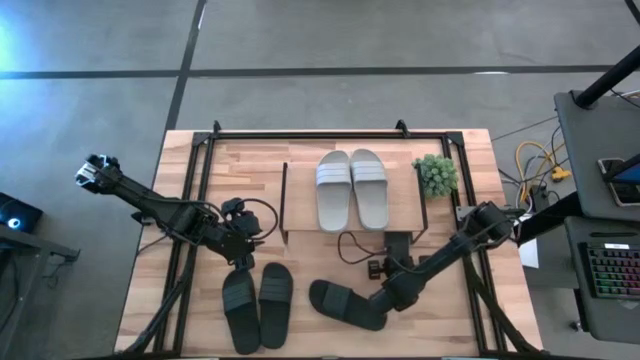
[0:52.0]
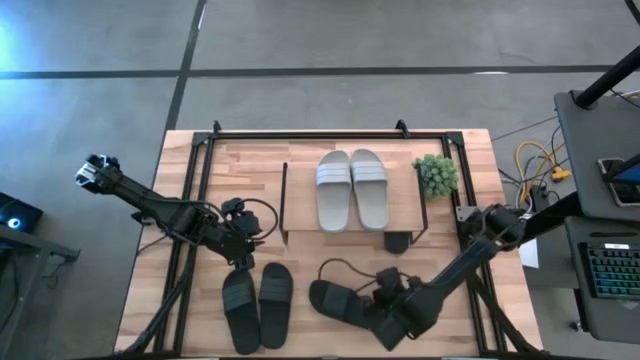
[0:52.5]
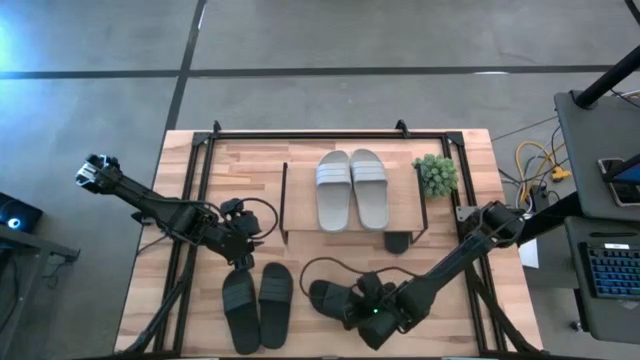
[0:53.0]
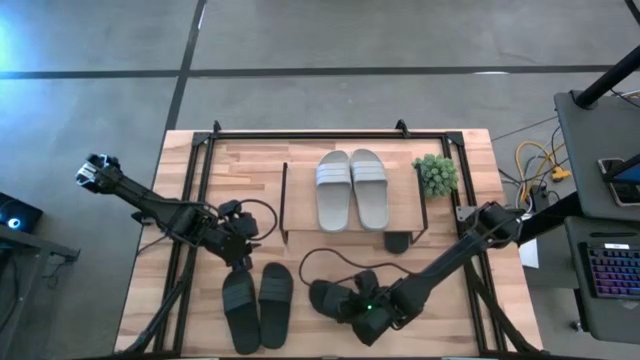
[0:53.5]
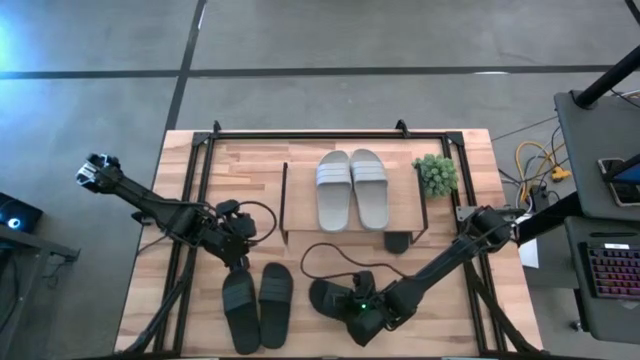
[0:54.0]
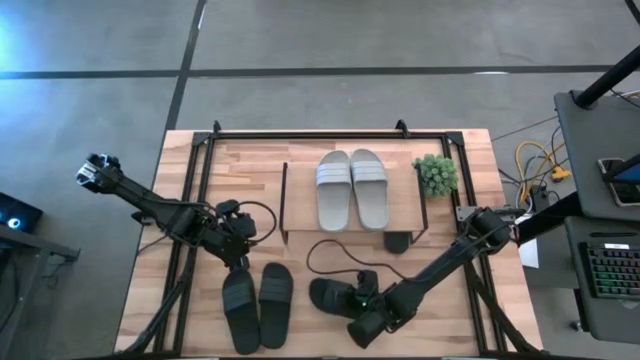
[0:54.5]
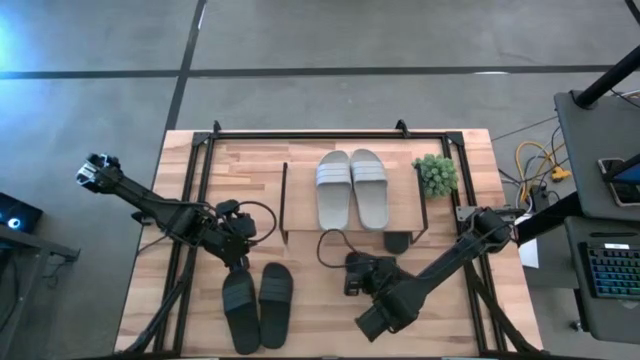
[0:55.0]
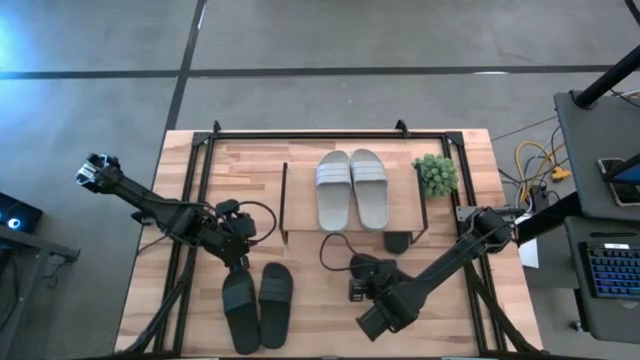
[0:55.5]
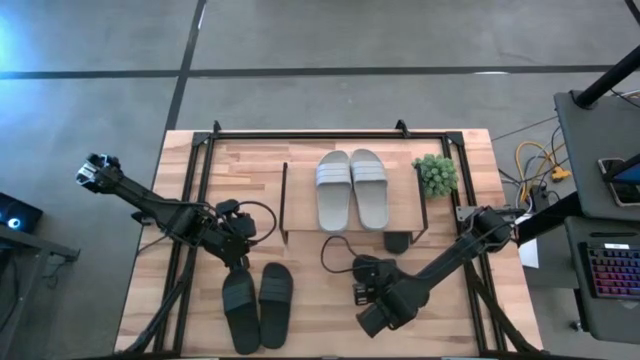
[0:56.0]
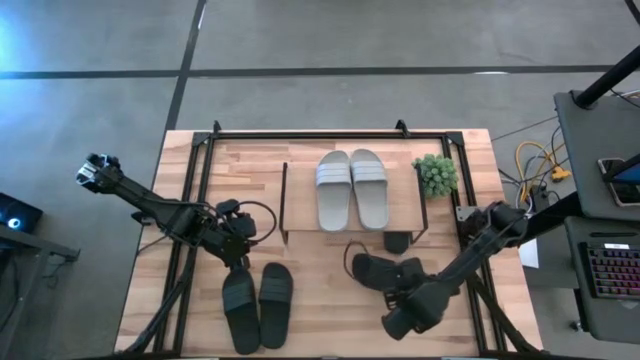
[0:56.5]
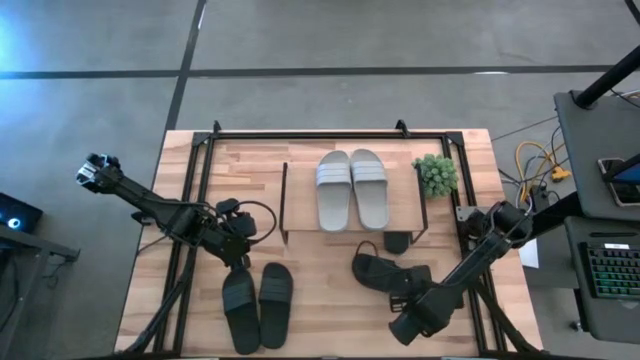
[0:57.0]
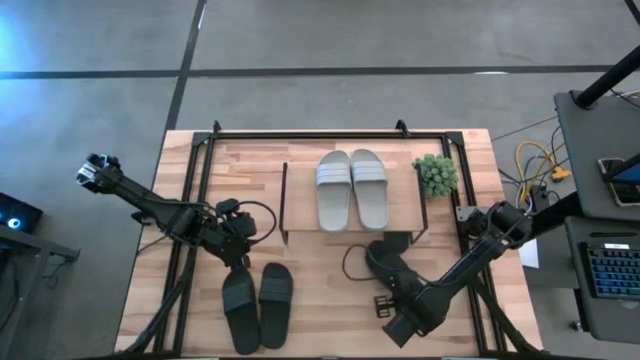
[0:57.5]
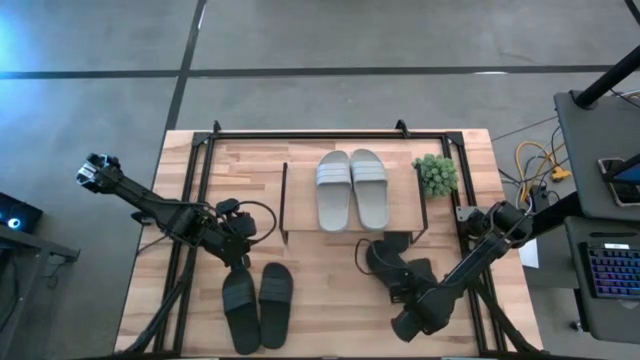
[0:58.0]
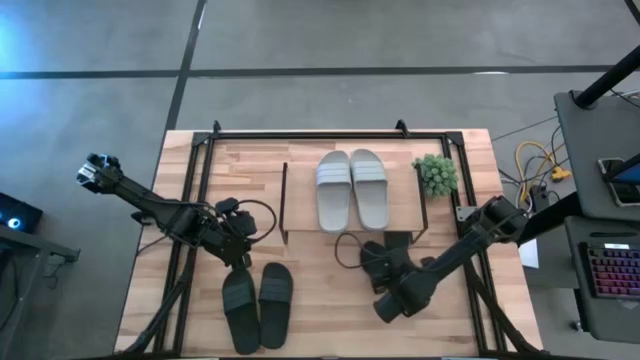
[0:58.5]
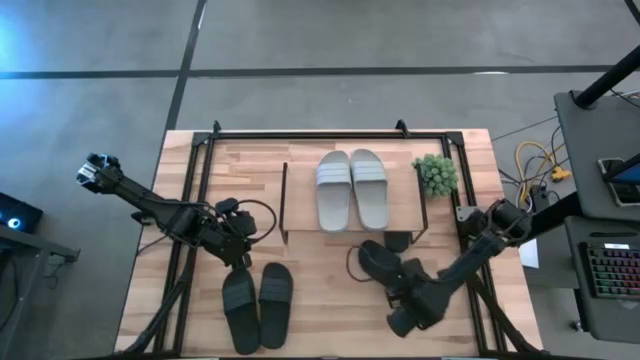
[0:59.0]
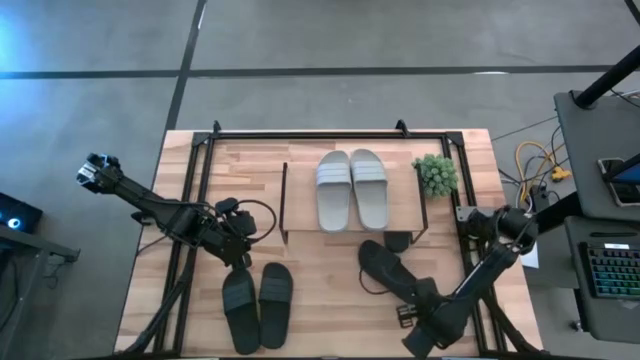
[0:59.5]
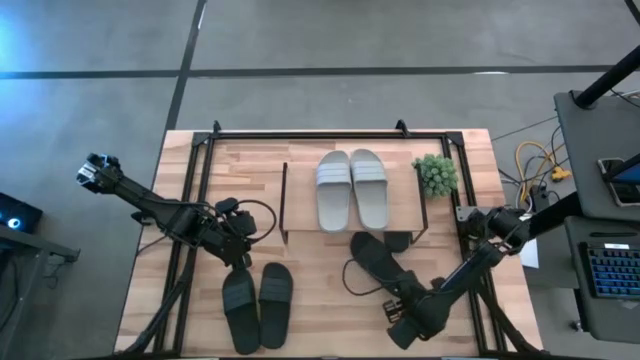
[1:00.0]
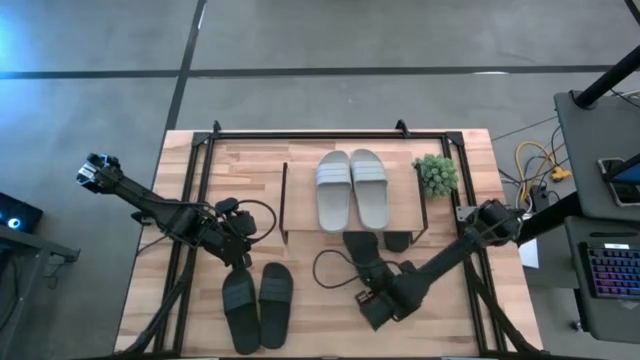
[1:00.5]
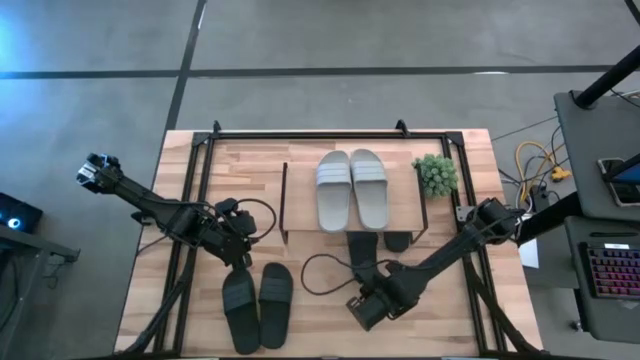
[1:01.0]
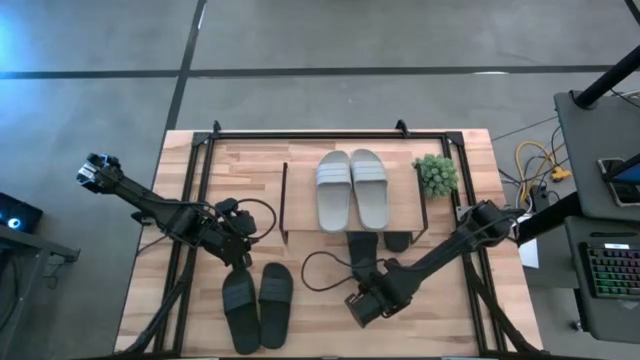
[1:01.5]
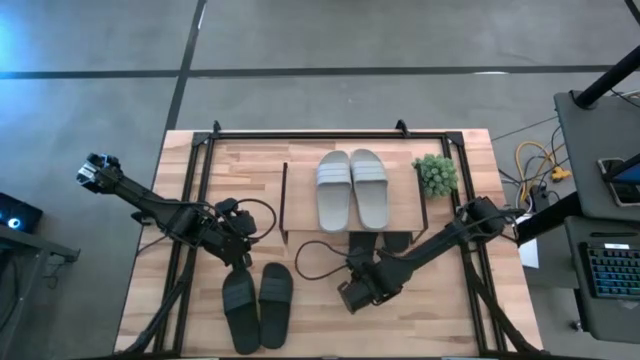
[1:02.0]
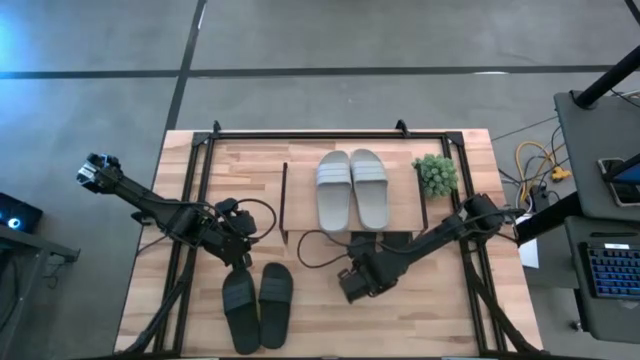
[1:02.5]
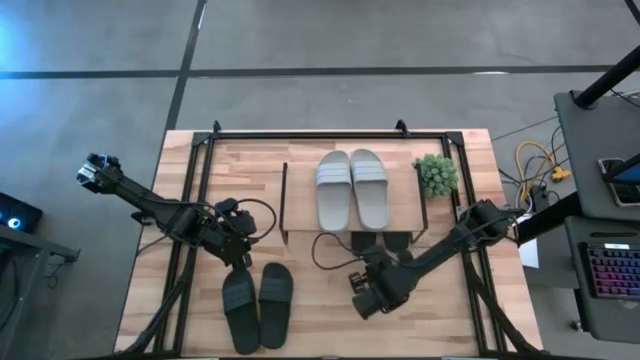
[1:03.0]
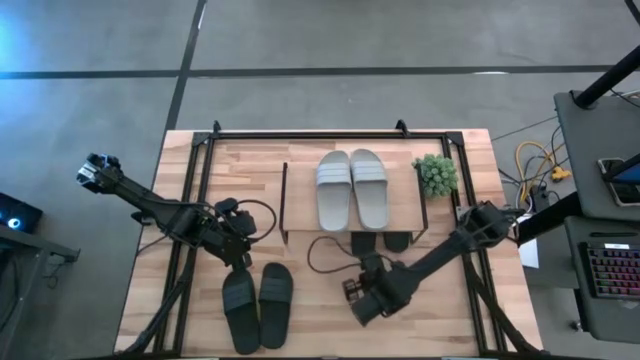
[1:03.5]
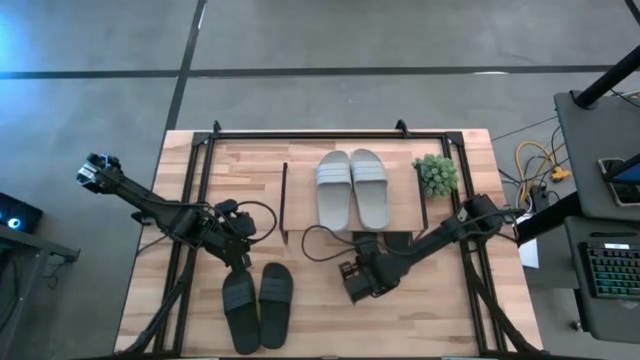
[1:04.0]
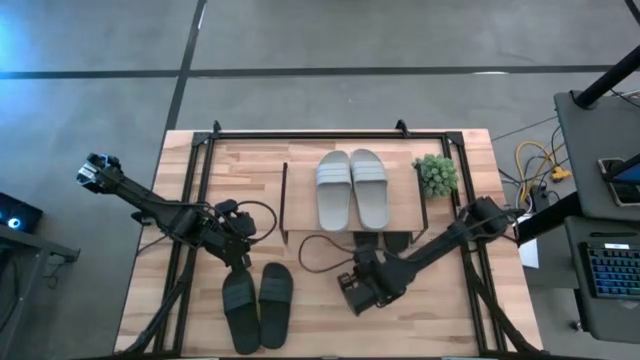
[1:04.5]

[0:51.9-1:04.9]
Task: Pick and place slides into the shelf
Put the right black slide under the shelf

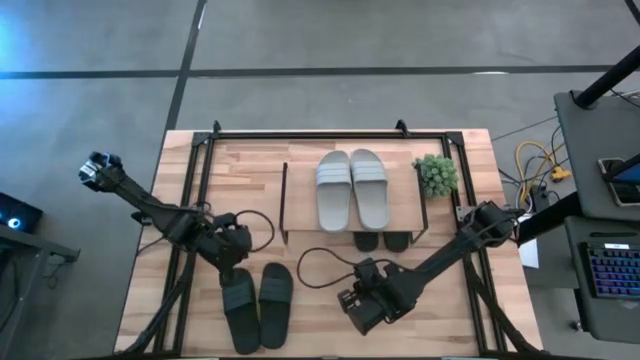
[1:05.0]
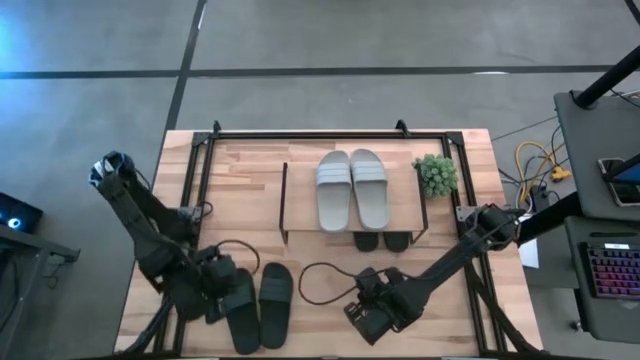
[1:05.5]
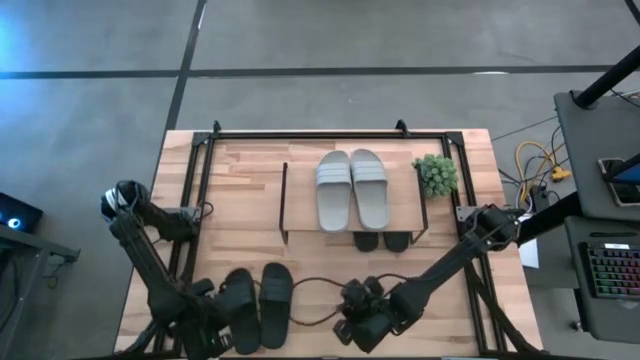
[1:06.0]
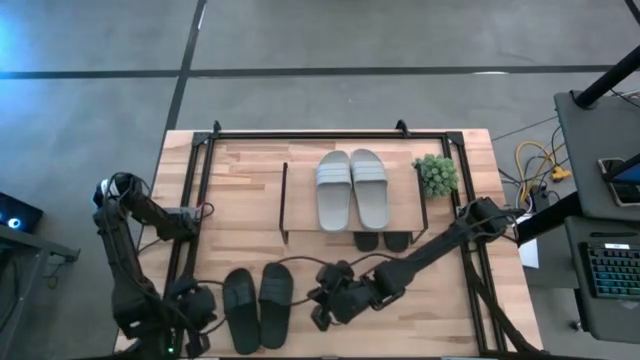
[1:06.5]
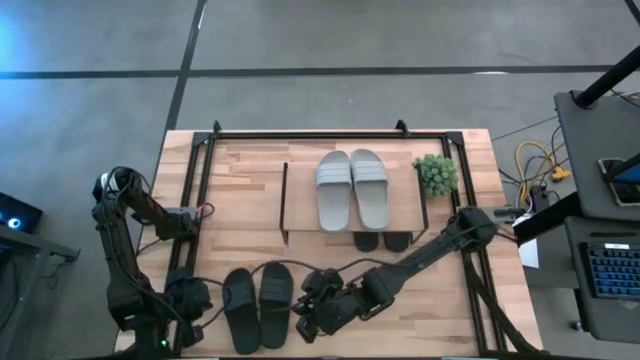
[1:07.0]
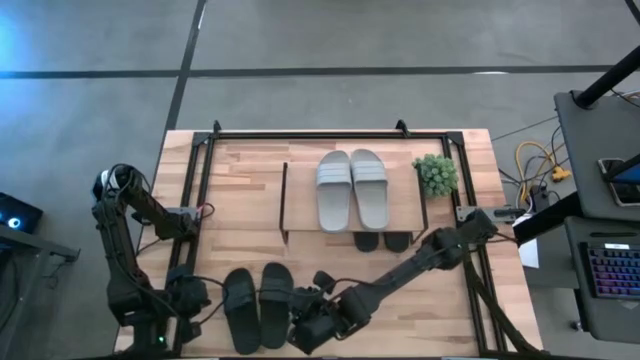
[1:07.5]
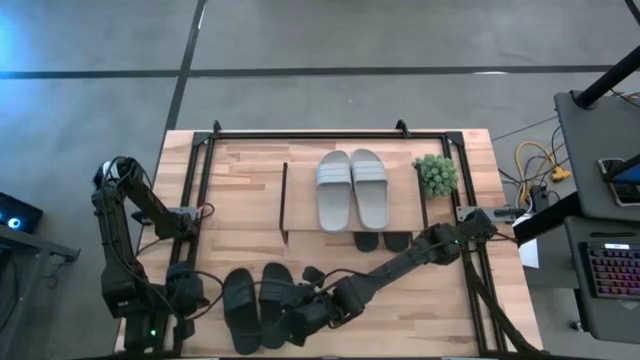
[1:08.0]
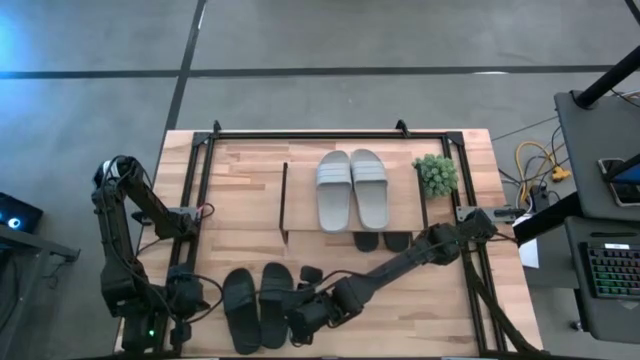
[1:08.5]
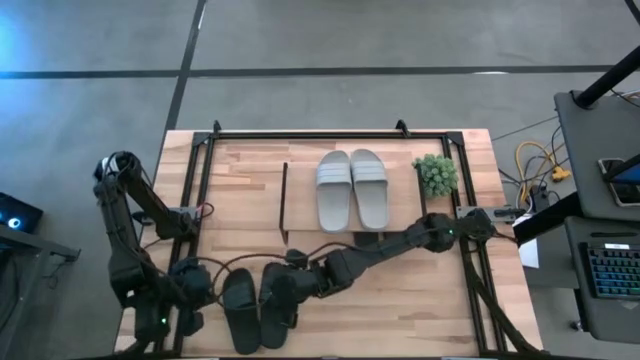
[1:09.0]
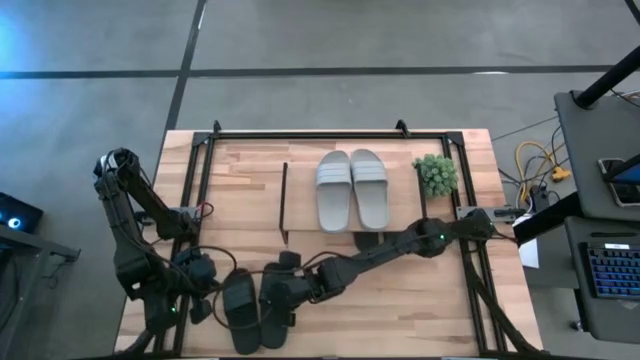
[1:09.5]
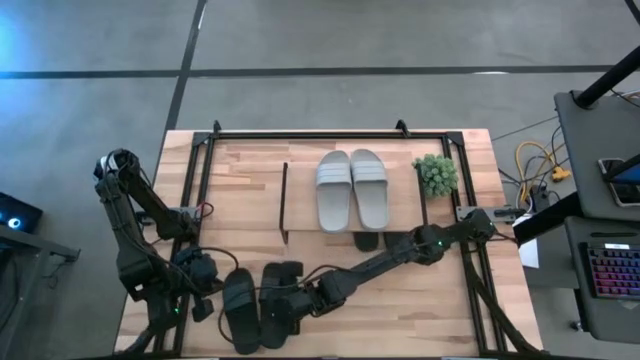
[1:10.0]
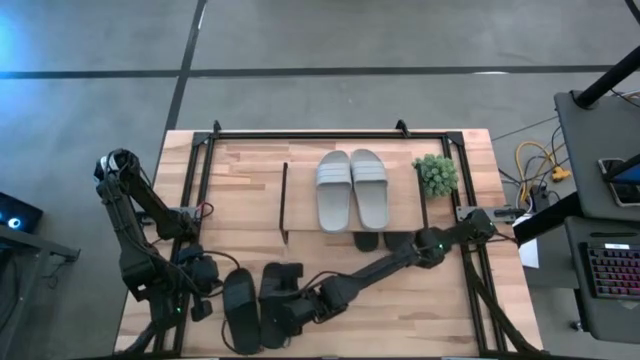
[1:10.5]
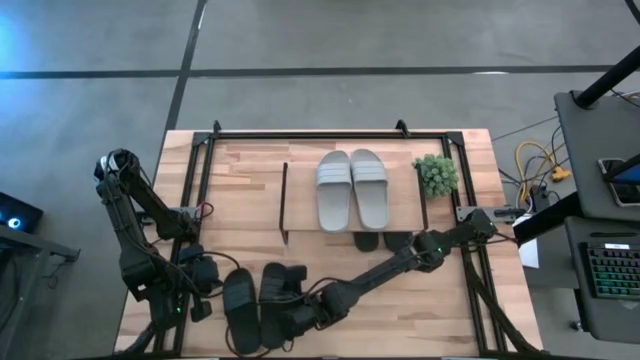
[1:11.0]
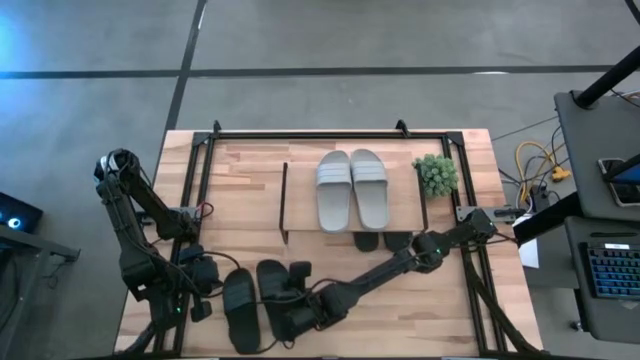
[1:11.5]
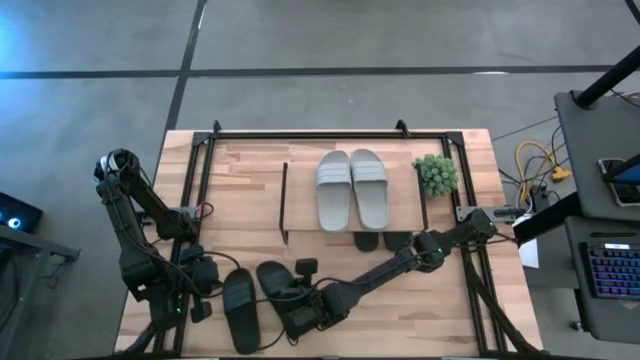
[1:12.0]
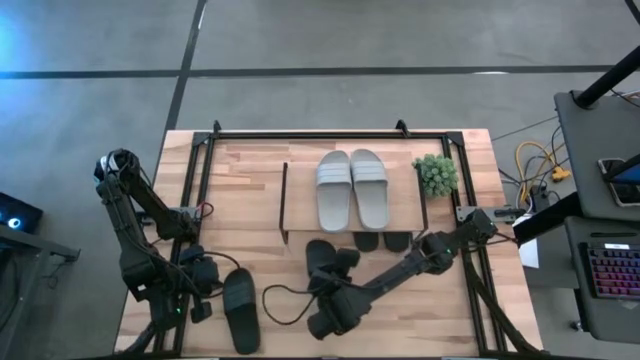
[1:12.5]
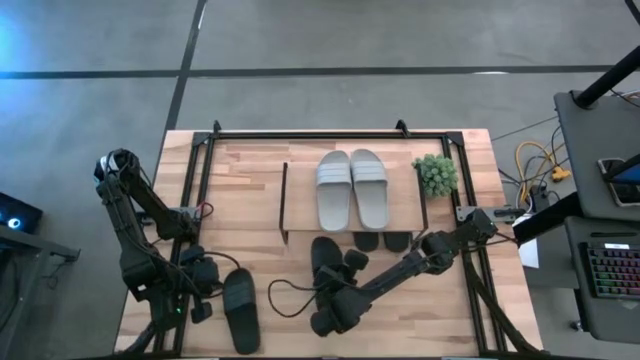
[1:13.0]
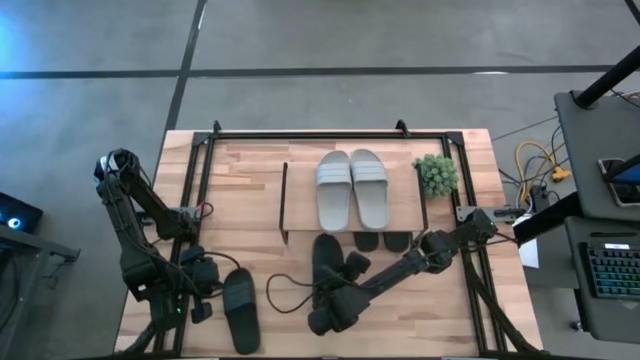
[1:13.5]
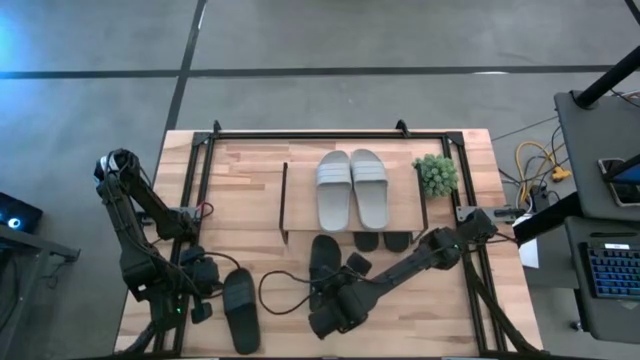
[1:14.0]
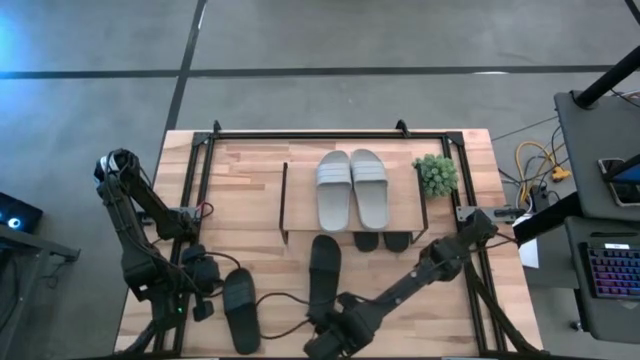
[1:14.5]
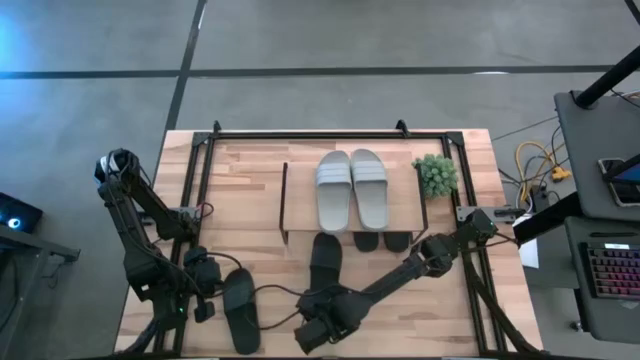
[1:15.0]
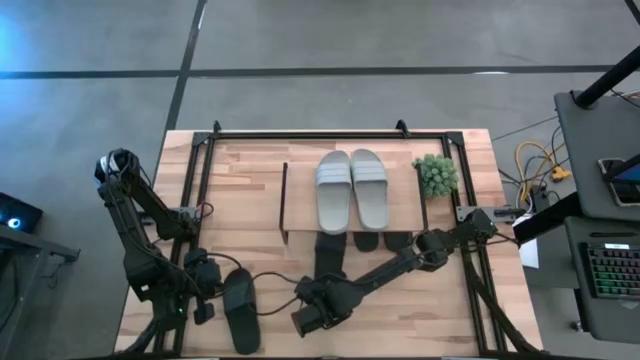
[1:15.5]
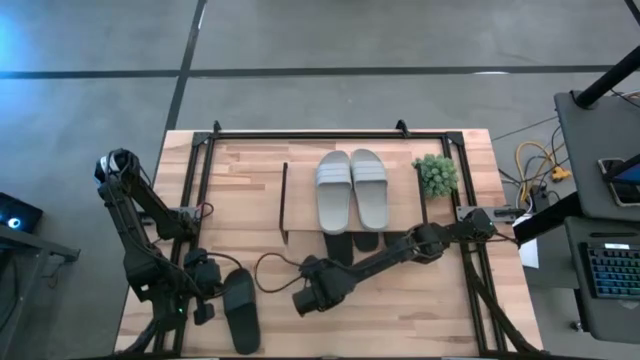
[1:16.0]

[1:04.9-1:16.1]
Put the right black slide under the shelf
